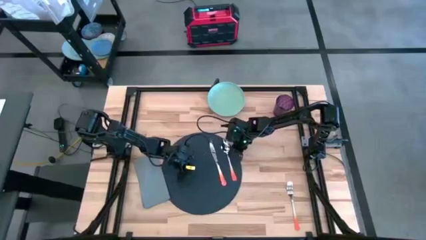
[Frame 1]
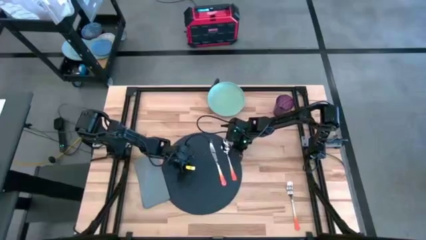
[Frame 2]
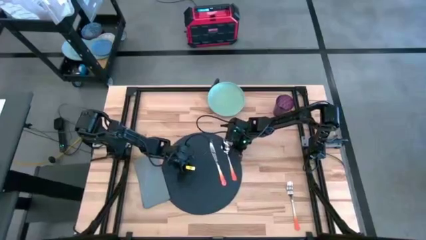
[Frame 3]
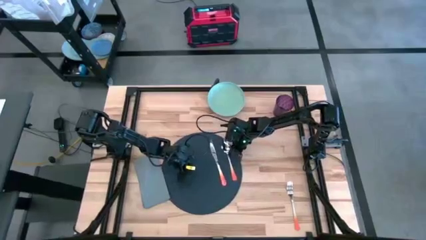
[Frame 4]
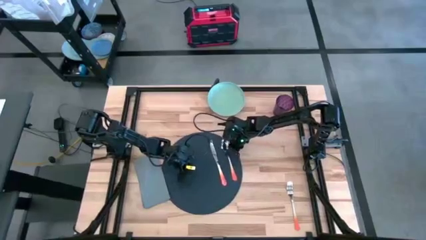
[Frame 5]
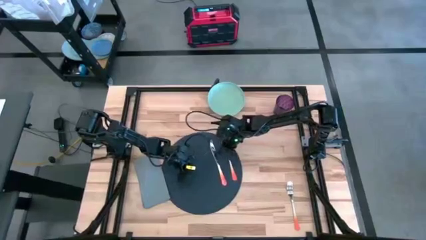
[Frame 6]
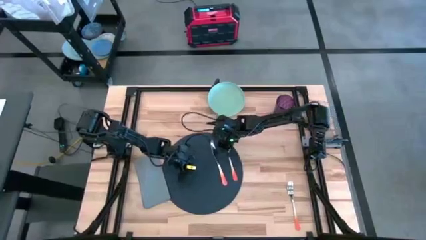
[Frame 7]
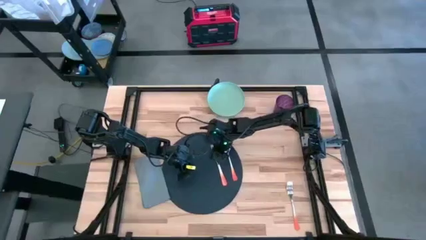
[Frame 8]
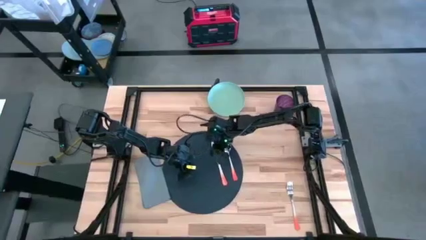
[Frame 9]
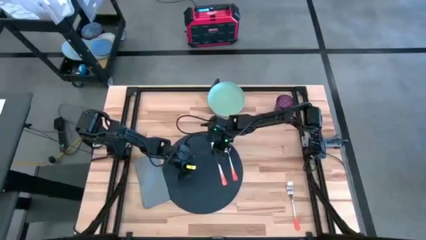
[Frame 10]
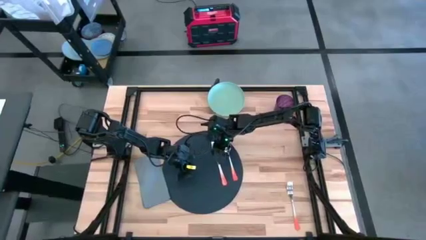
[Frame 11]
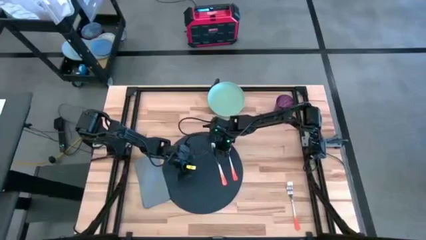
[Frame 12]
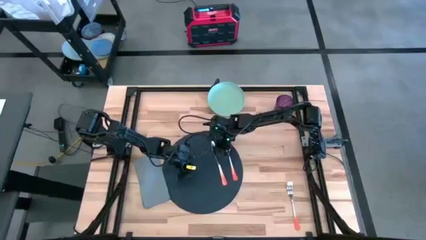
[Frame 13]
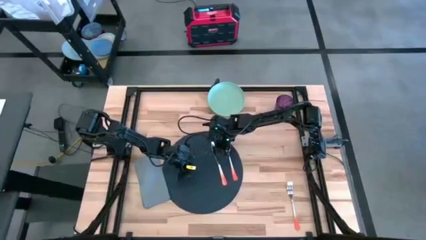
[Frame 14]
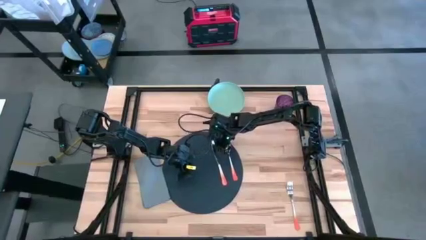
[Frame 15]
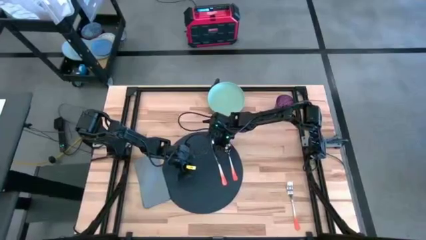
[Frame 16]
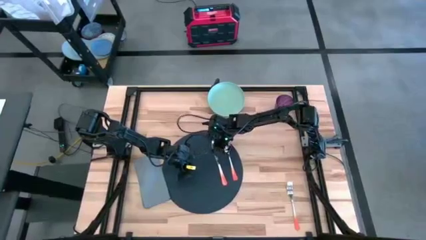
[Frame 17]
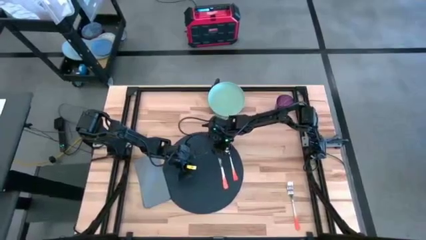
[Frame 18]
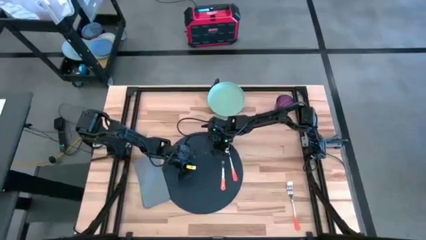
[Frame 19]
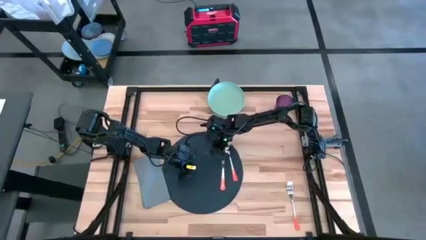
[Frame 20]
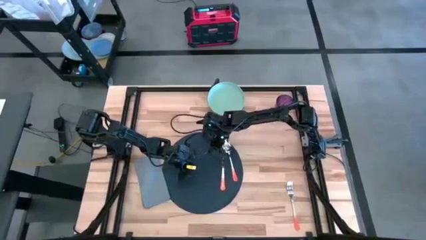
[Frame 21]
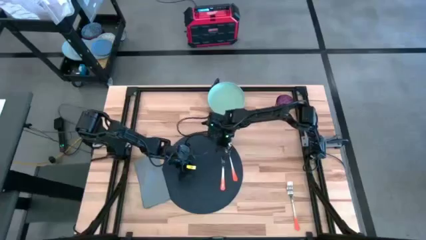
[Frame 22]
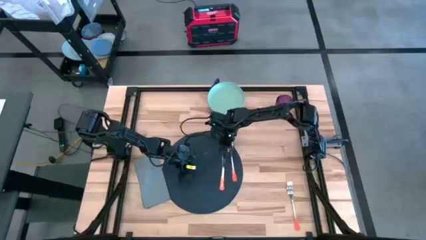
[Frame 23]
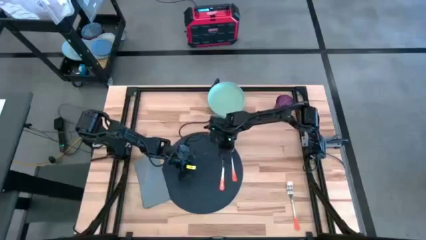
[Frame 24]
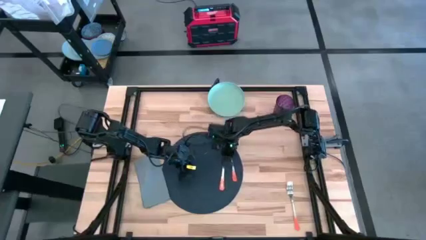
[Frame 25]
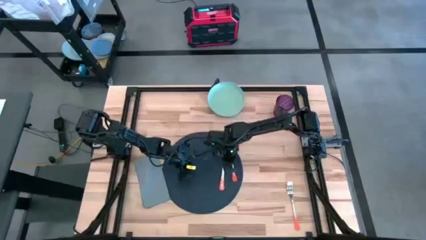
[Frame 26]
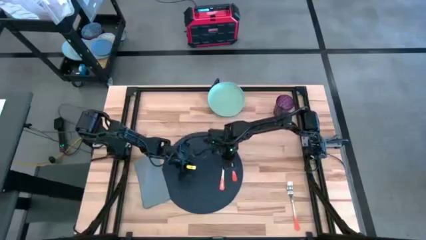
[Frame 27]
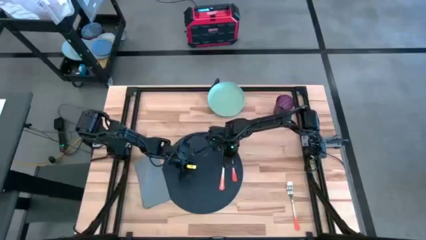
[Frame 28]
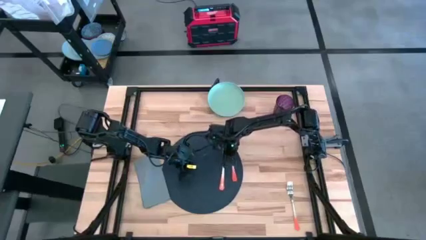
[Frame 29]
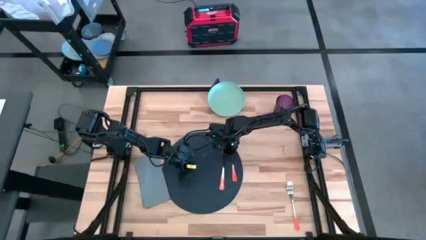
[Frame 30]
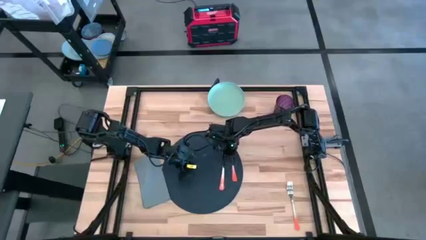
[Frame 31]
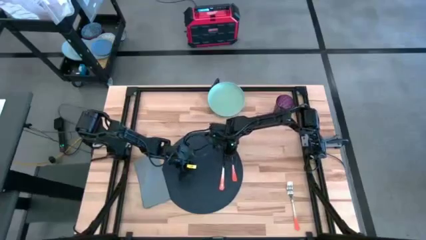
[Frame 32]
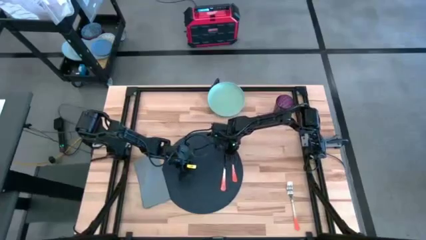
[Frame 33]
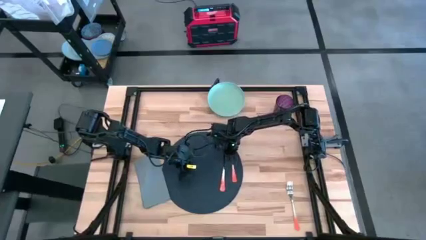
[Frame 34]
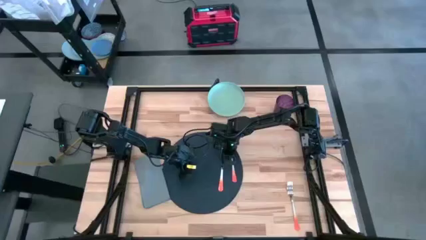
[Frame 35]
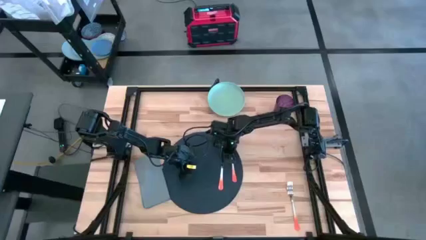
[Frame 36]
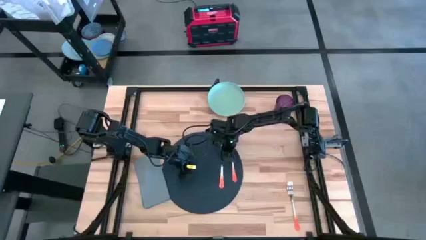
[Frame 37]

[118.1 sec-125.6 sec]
Task: Set table place
Adjust the orange table knife on the dark gray placemat

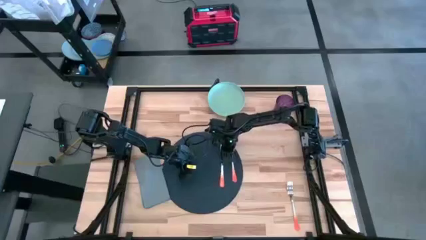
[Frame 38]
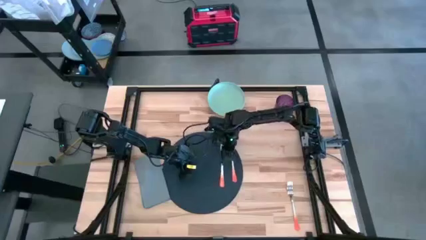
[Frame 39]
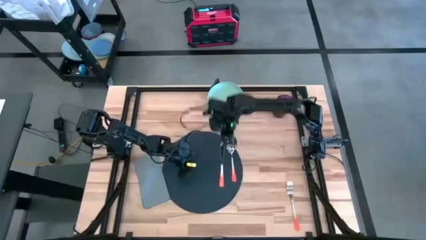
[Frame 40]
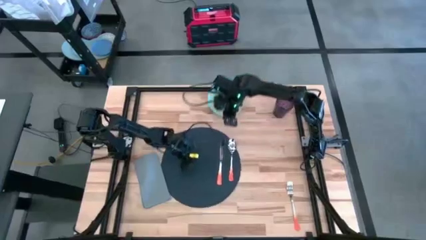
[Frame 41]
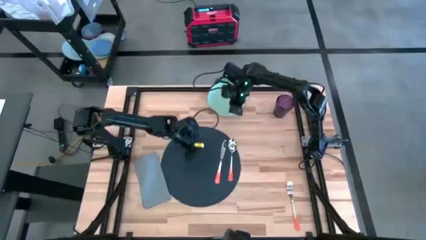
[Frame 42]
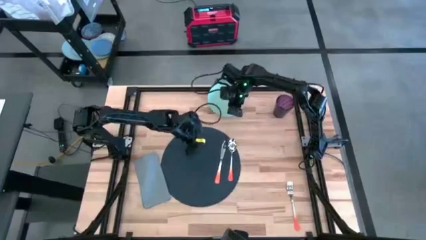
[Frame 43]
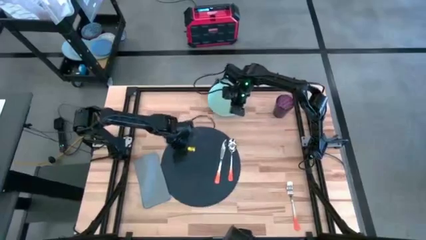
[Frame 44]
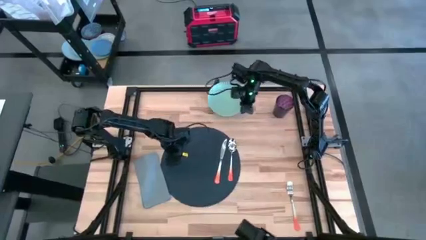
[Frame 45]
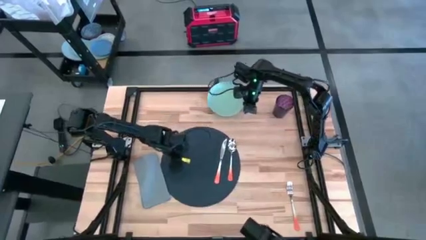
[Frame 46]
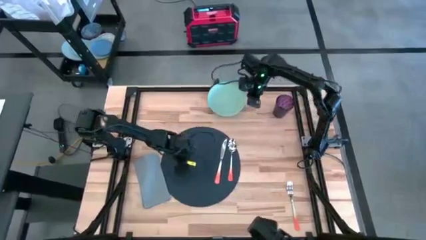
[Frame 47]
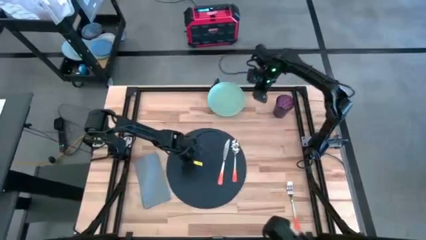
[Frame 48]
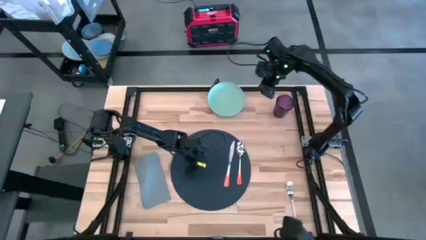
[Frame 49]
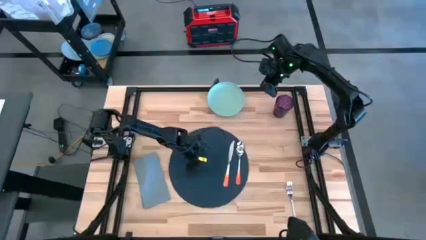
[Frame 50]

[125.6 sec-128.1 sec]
Adjust the dark gray placemat on the table

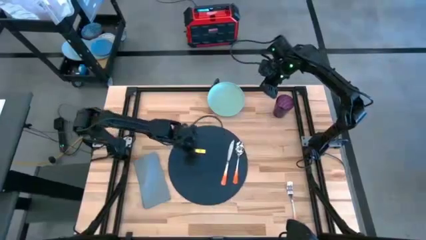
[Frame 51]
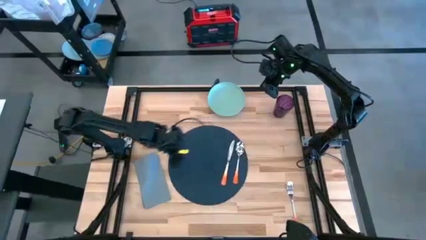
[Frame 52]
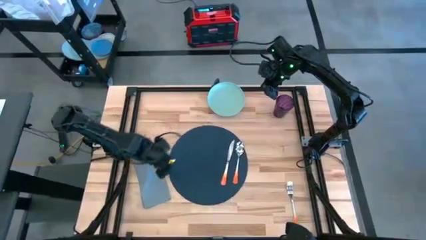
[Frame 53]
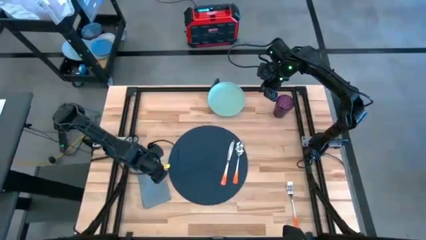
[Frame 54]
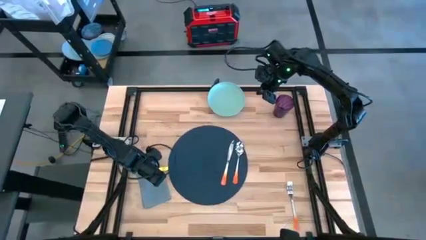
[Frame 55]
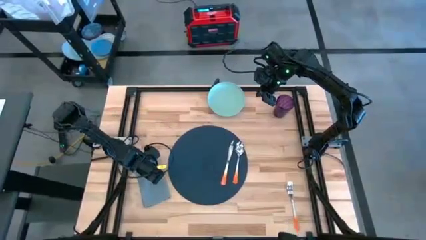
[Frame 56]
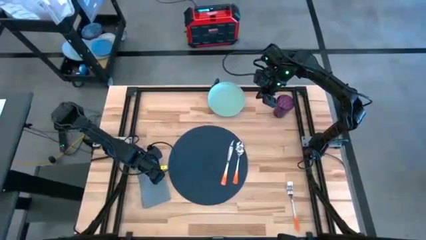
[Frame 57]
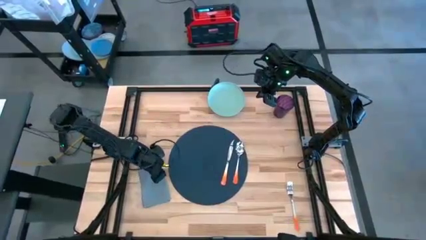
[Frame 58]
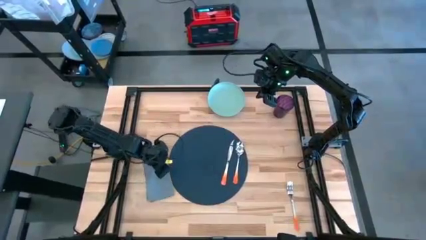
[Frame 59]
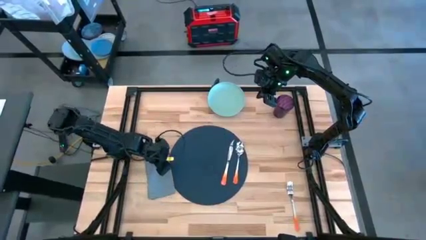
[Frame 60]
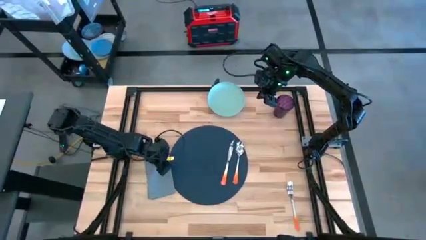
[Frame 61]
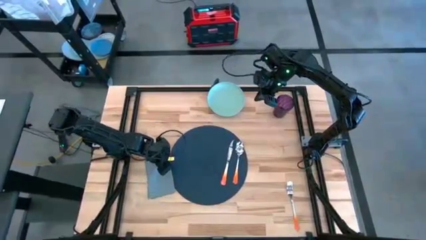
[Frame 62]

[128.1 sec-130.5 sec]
Adjust the gray table napkin on the table
